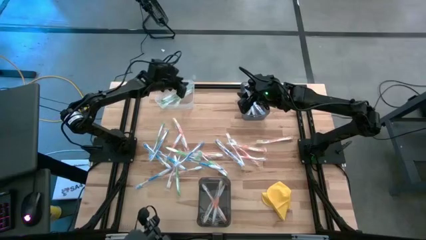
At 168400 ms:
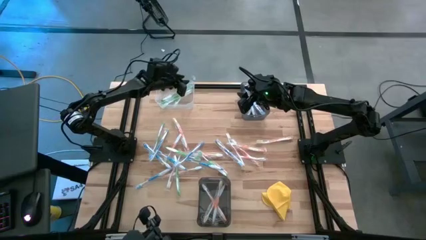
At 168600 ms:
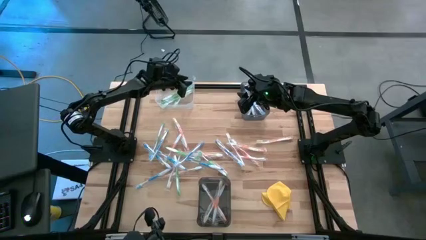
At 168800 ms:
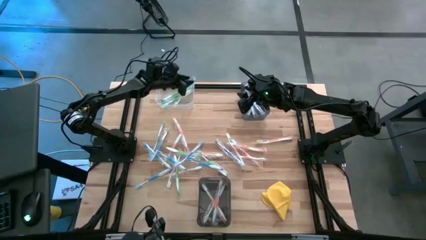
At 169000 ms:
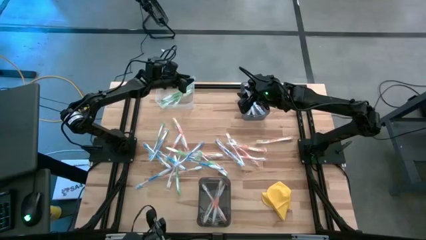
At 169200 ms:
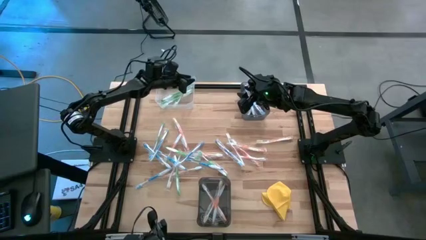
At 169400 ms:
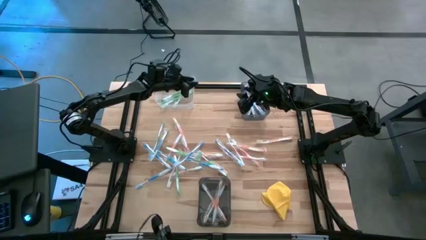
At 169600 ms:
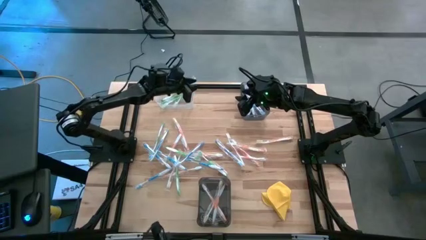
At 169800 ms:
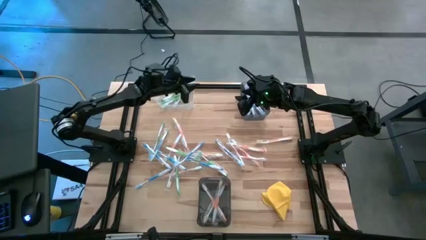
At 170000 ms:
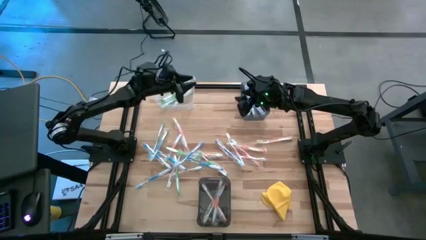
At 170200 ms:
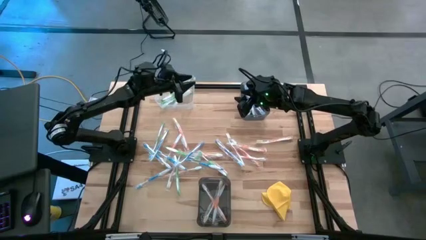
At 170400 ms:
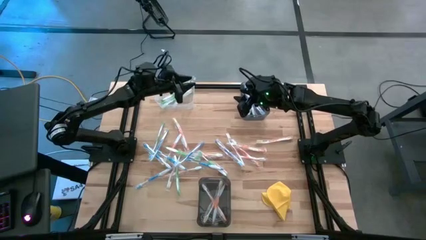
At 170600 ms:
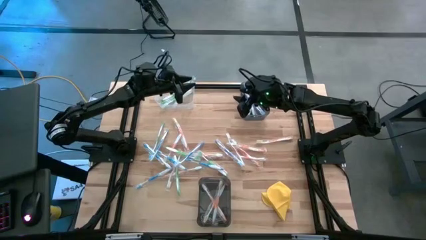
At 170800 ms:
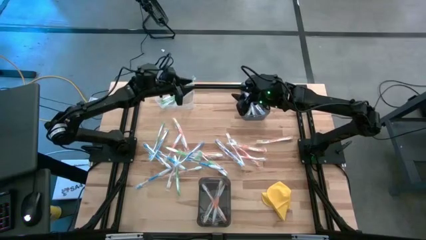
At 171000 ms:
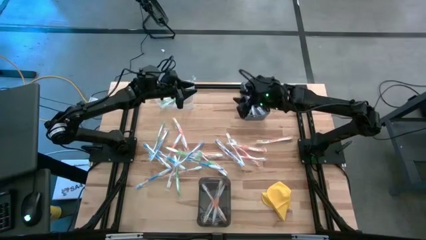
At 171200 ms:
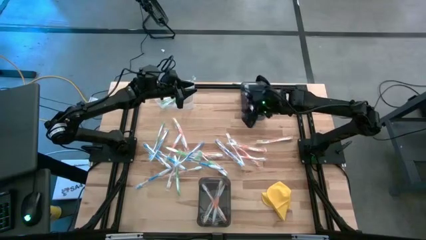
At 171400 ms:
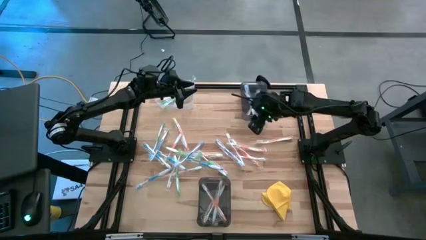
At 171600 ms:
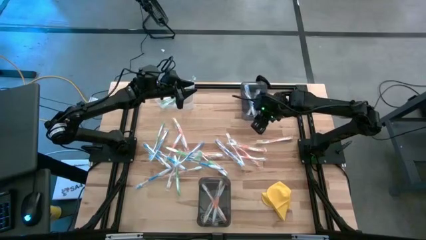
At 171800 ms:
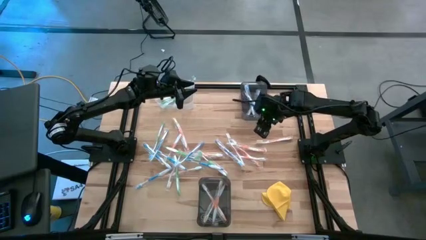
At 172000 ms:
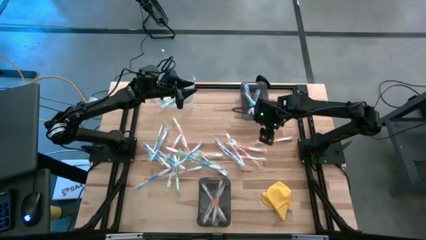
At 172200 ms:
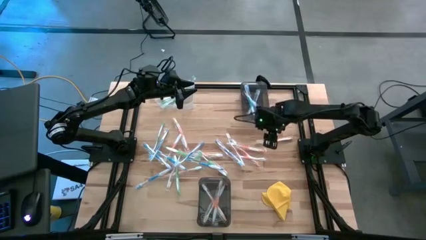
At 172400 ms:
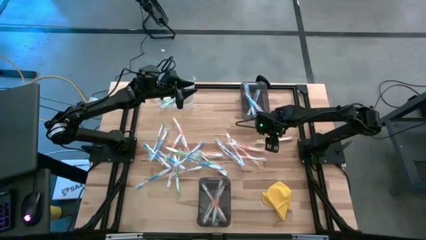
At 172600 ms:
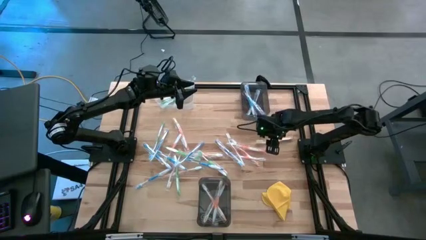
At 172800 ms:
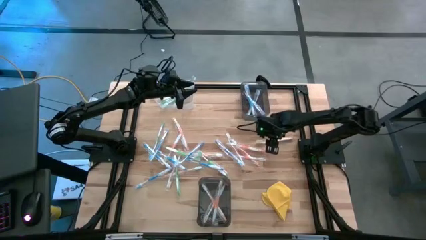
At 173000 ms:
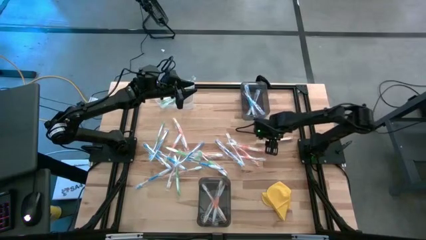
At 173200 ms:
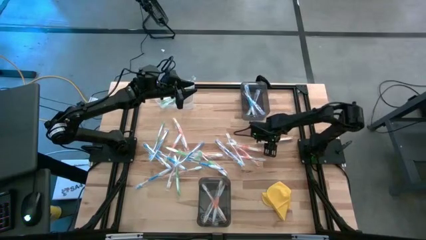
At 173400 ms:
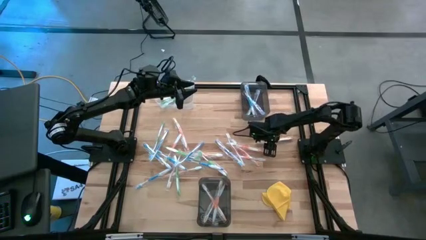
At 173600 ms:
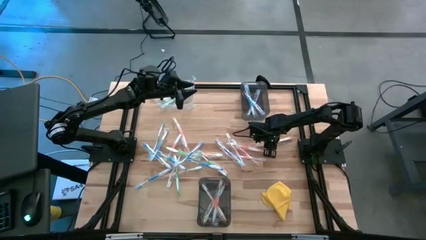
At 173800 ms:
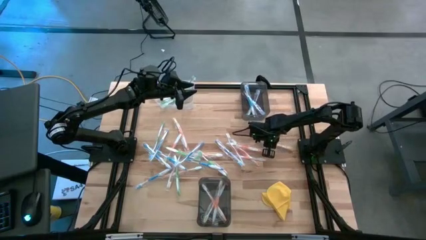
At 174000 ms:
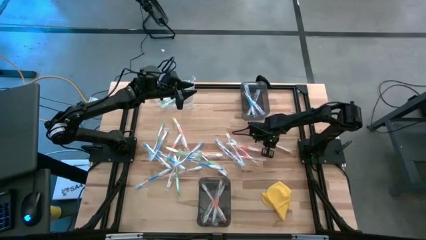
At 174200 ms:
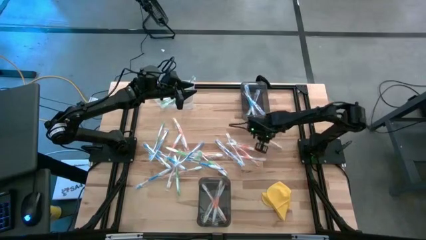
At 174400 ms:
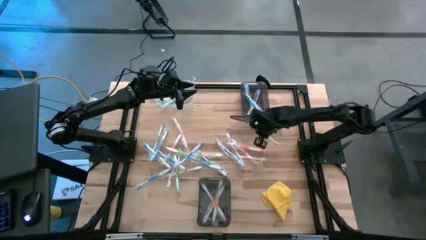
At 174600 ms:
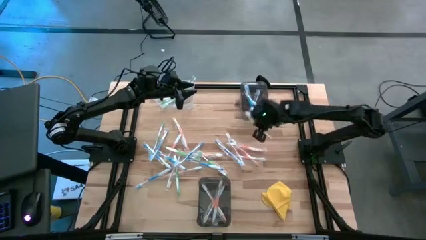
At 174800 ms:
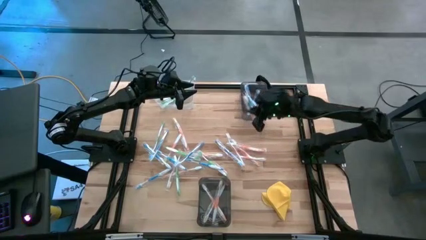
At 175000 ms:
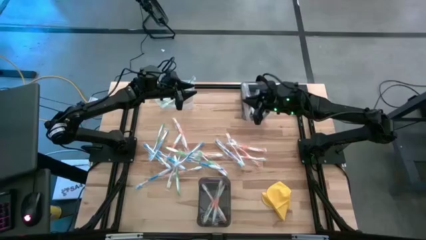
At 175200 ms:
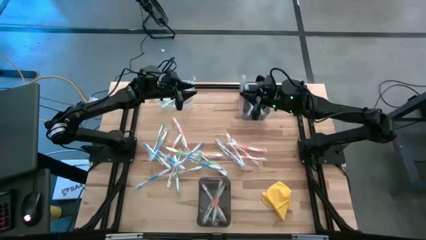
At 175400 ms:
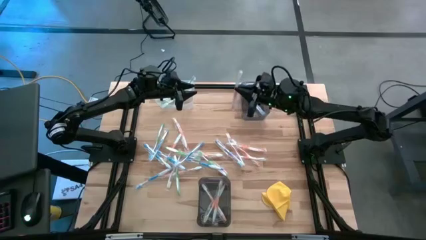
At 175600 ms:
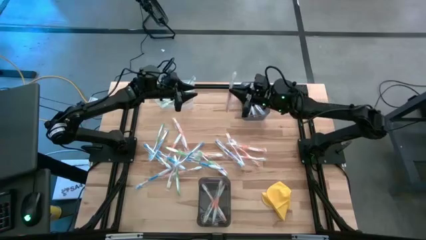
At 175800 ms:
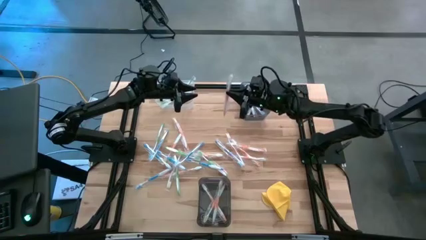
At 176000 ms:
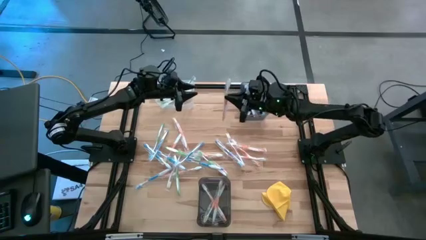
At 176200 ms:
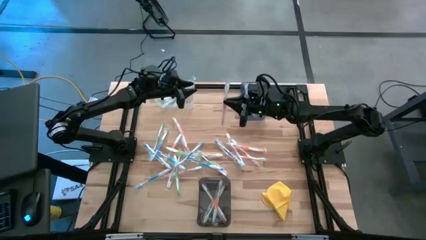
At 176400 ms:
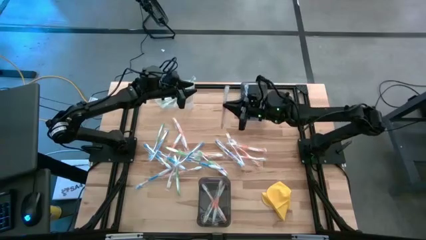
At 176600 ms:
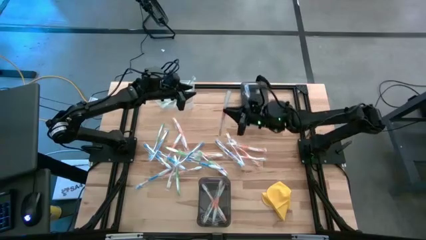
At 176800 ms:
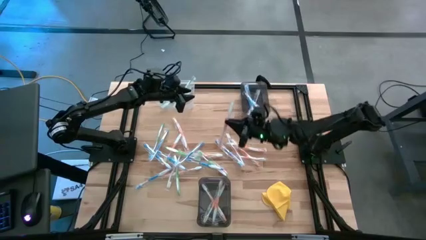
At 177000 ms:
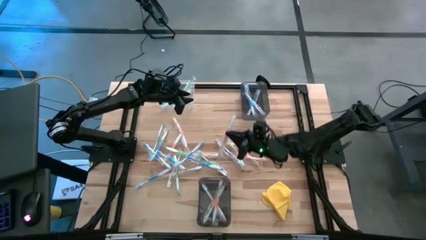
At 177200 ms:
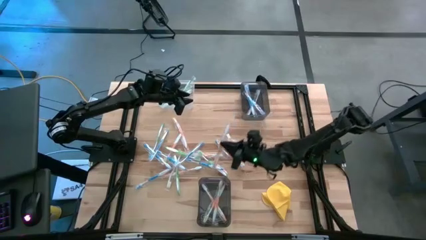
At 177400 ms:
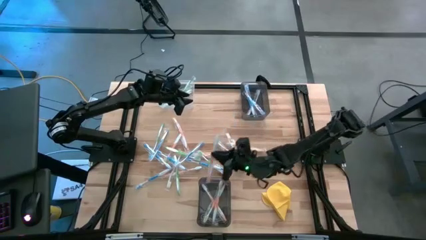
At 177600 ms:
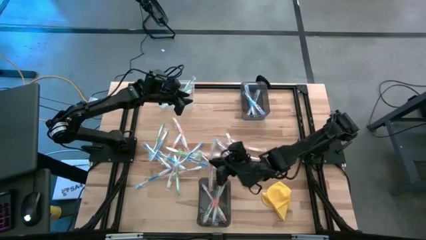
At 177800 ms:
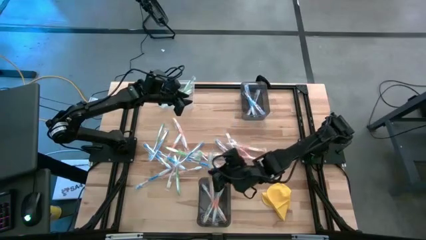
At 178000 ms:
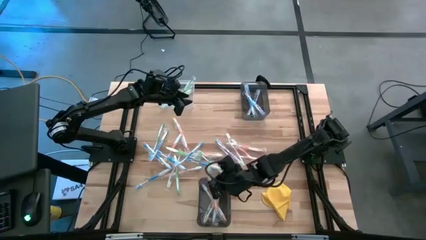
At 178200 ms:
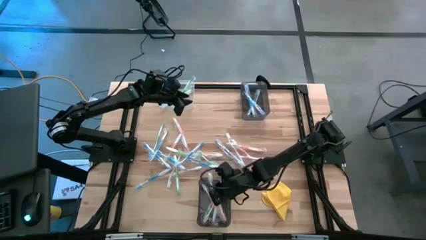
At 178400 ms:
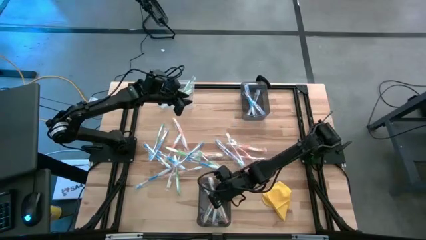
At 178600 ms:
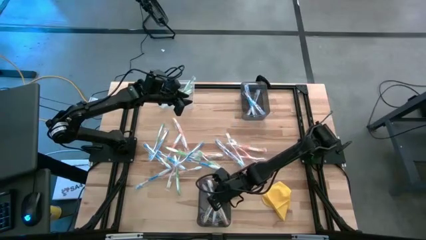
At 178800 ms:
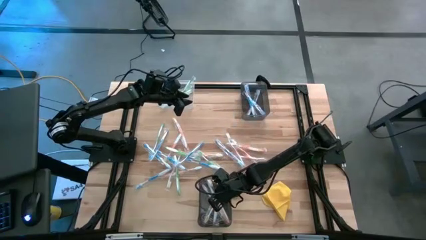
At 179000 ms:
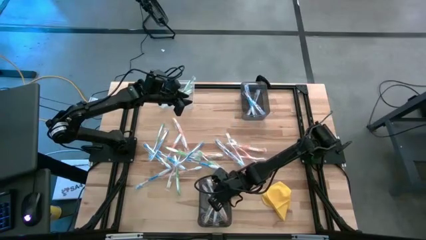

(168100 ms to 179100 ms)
Task: Pick & Place Toothbrushes
Put the orange toothbrush into the bottom black bin

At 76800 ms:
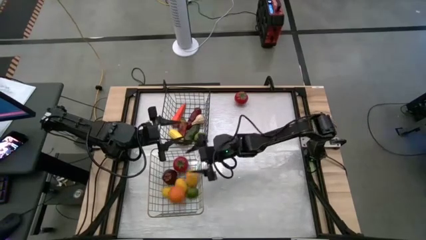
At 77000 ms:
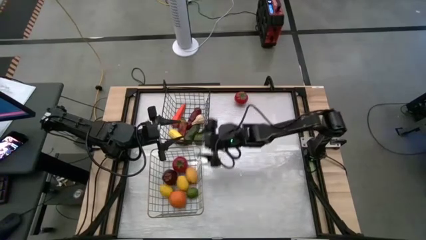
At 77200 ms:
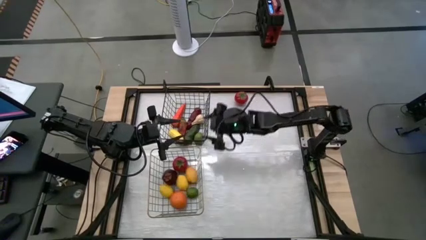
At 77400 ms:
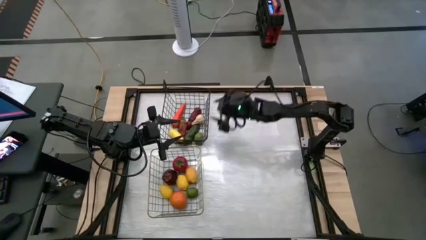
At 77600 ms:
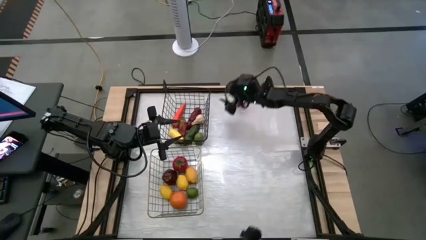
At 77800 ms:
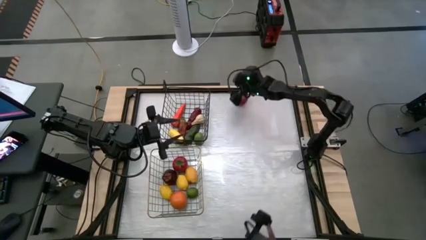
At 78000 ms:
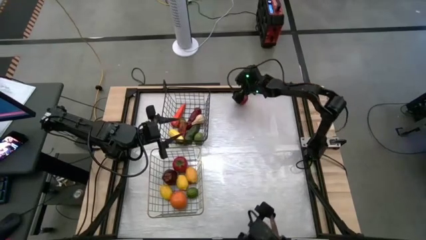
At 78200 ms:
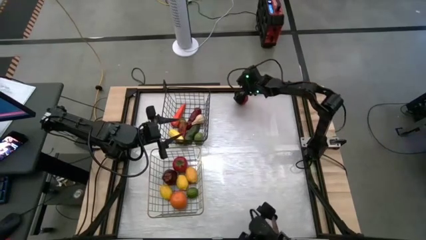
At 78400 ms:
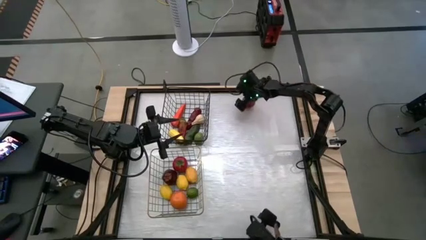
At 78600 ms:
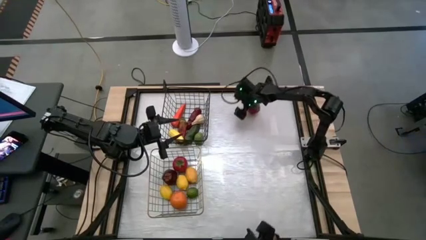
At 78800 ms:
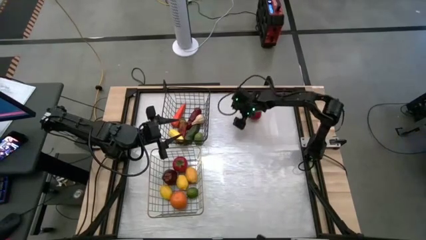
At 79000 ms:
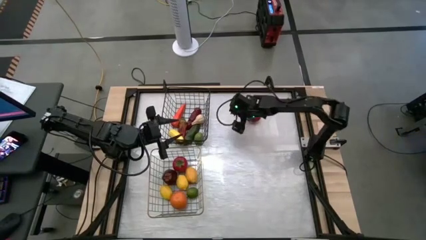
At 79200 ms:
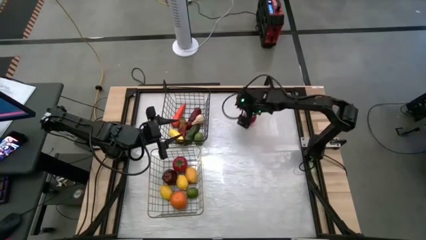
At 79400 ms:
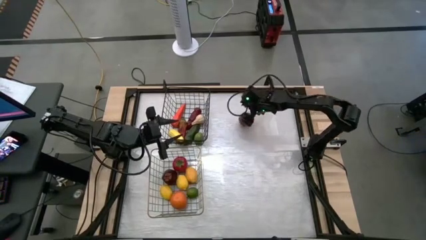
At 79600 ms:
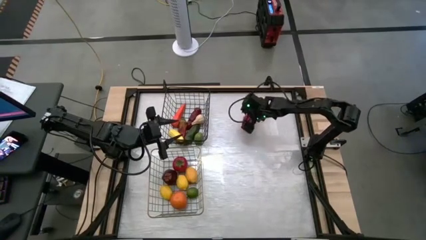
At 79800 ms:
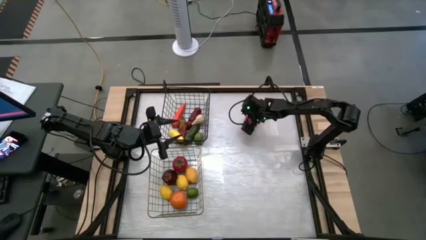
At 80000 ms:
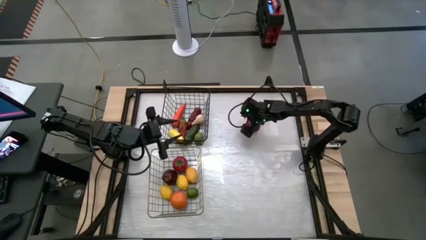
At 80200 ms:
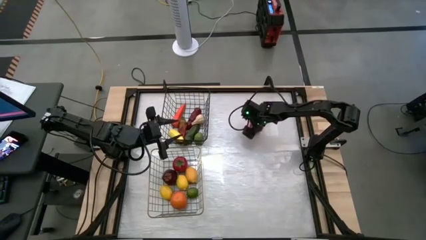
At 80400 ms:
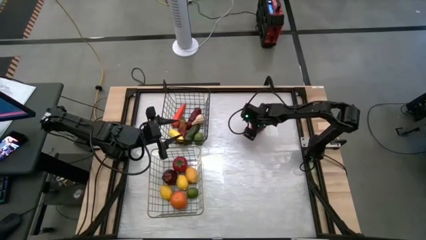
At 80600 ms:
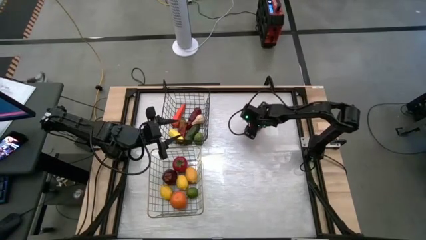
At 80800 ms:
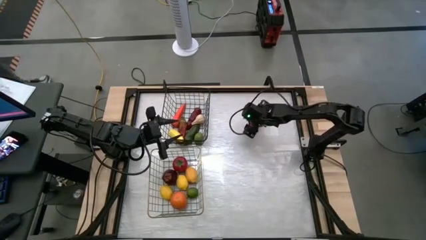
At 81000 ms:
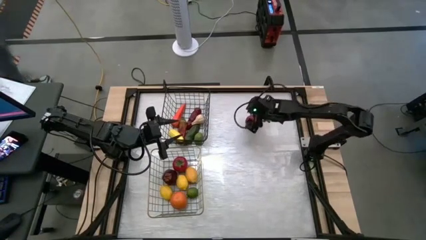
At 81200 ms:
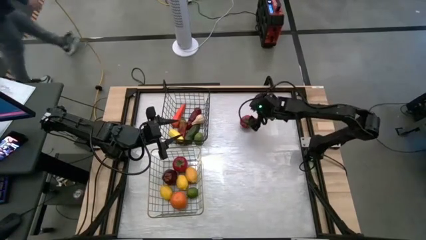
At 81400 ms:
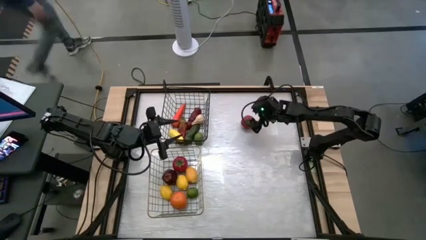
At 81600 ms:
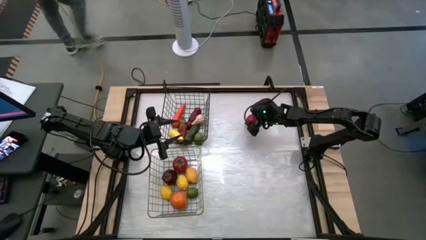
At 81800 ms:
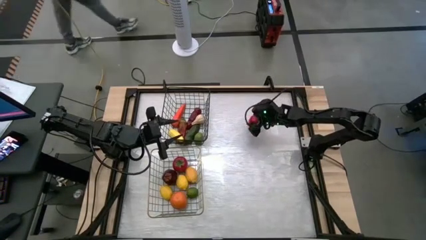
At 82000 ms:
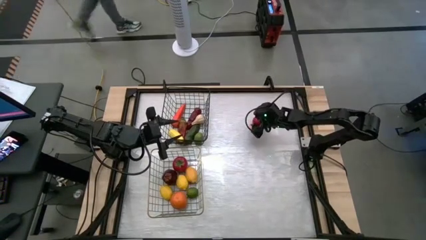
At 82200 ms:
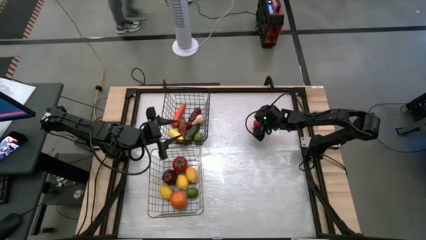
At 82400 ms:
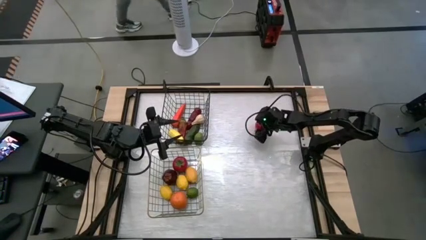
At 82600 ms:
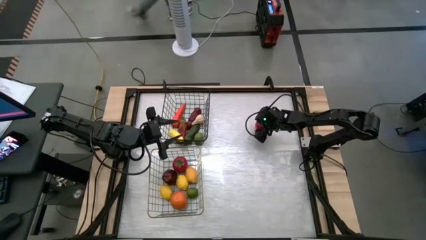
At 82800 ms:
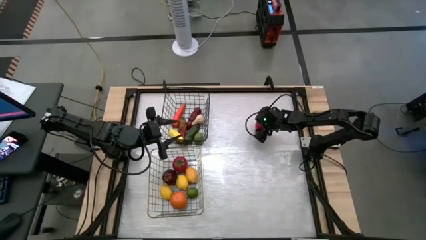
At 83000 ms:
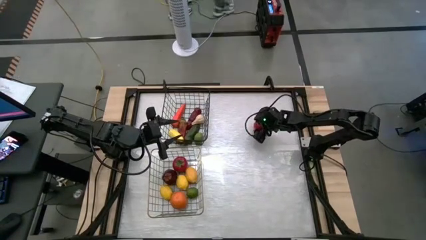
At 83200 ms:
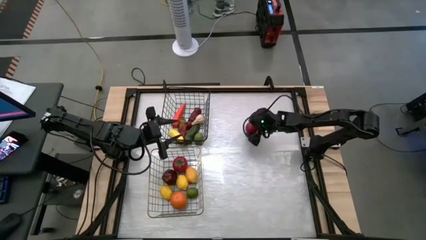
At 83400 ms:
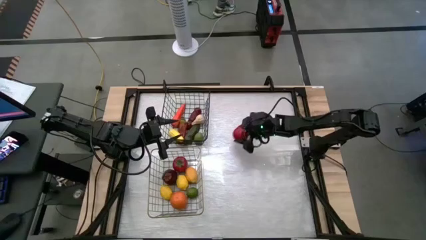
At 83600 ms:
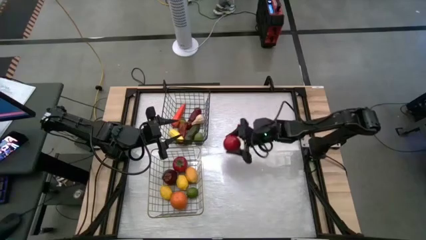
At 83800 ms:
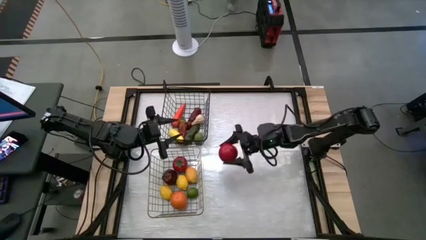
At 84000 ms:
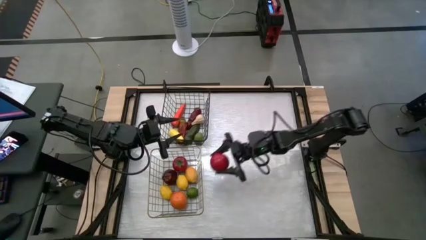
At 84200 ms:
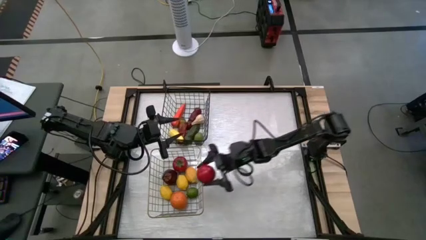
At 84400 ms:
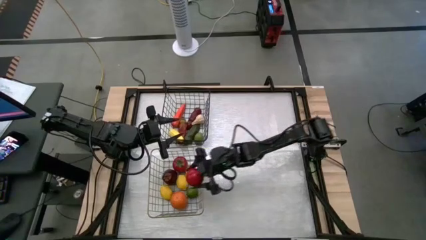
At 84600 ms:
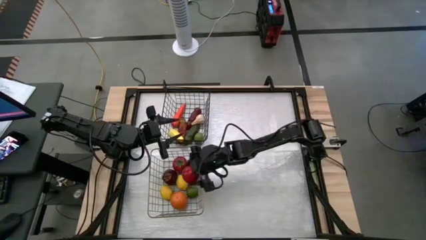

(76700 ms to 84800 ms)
Task: Sort produce into baskets
Put the red tomato into the gold wire basket
